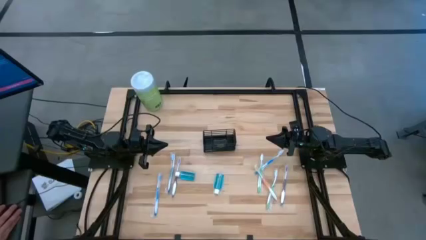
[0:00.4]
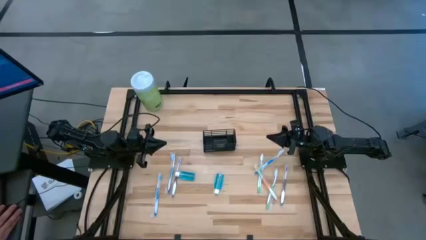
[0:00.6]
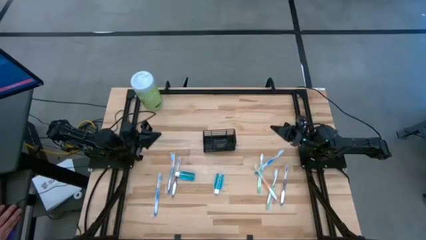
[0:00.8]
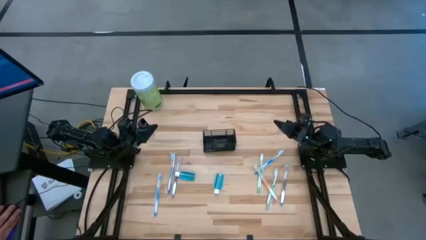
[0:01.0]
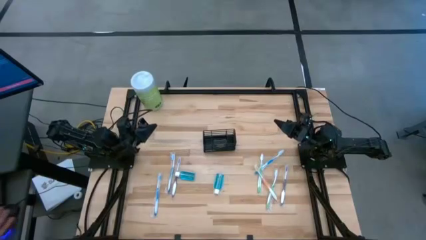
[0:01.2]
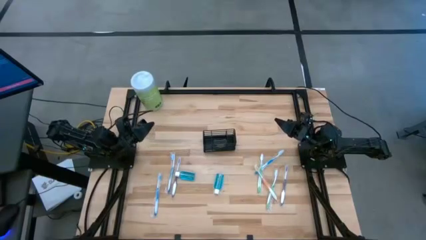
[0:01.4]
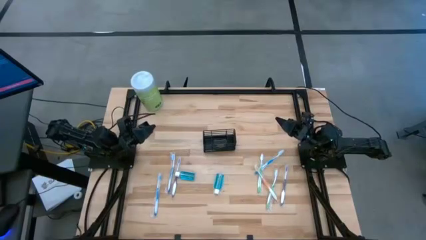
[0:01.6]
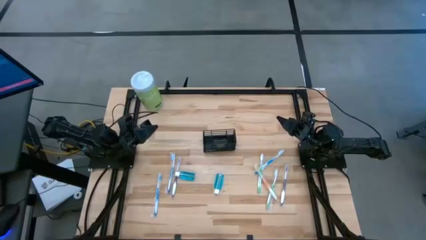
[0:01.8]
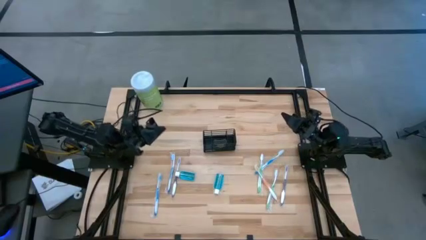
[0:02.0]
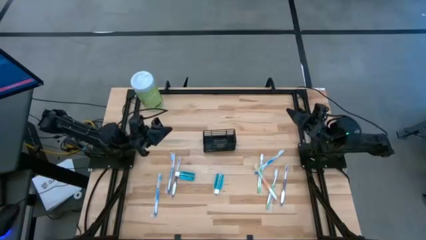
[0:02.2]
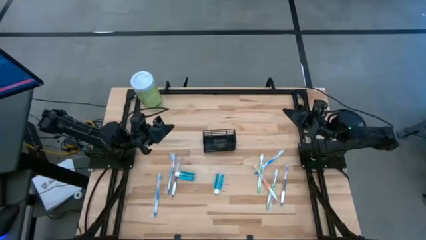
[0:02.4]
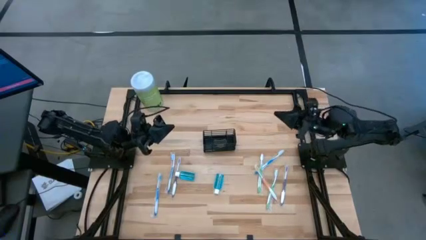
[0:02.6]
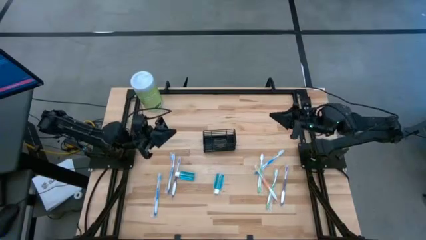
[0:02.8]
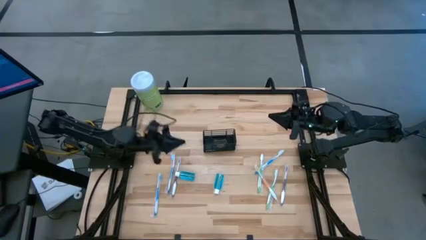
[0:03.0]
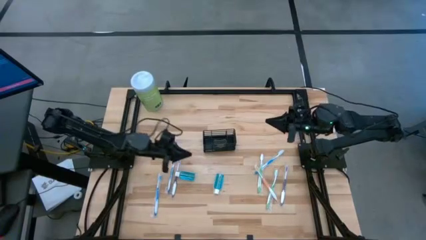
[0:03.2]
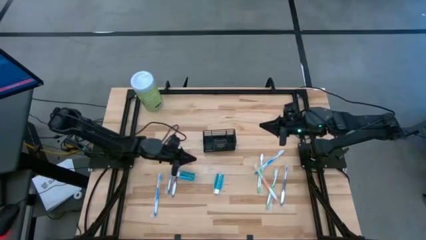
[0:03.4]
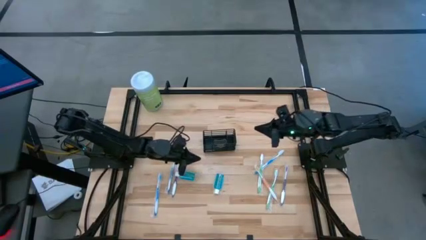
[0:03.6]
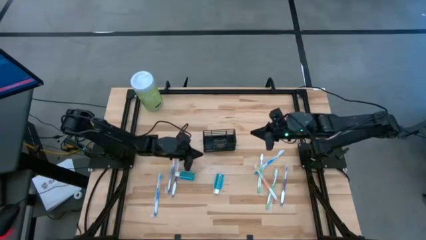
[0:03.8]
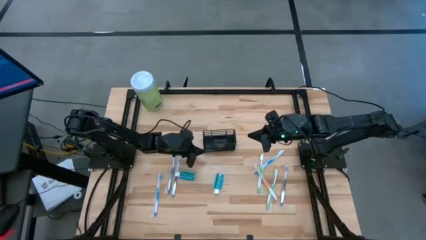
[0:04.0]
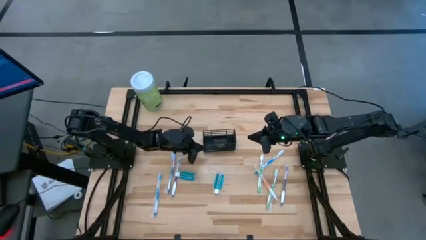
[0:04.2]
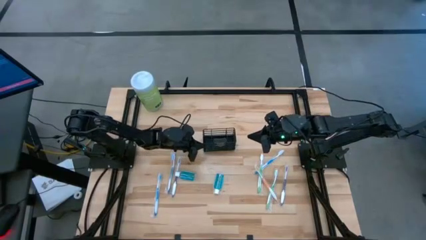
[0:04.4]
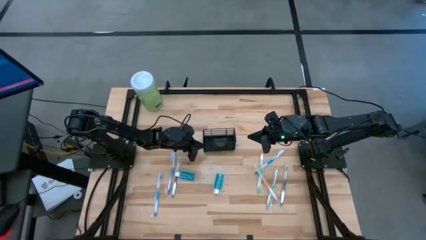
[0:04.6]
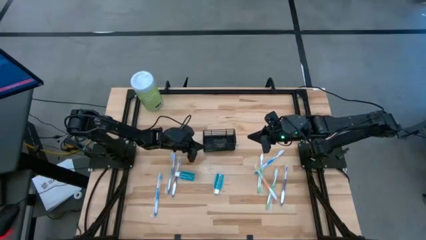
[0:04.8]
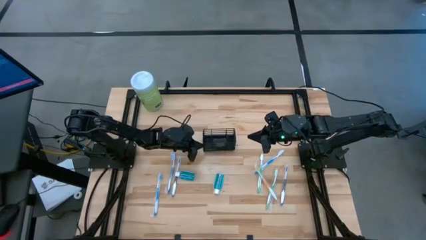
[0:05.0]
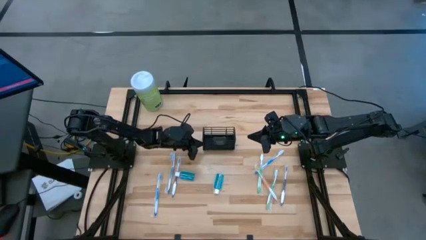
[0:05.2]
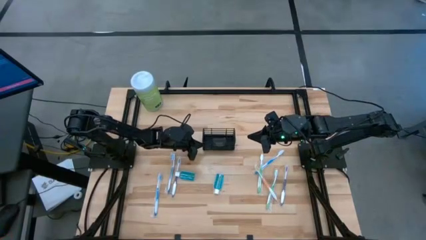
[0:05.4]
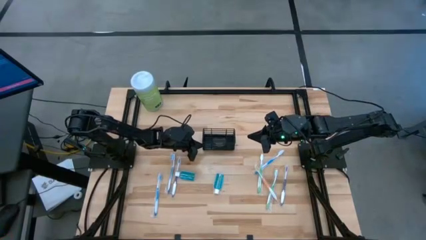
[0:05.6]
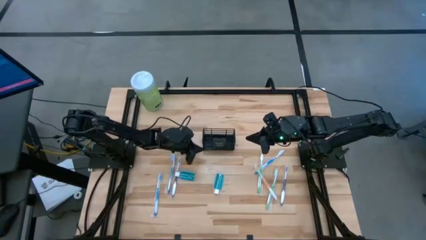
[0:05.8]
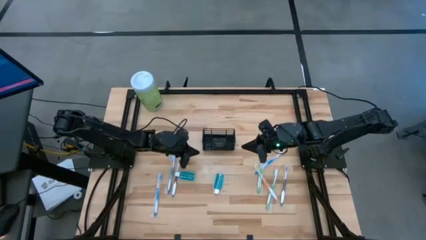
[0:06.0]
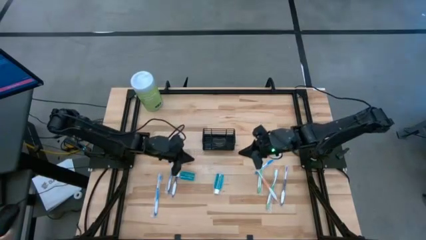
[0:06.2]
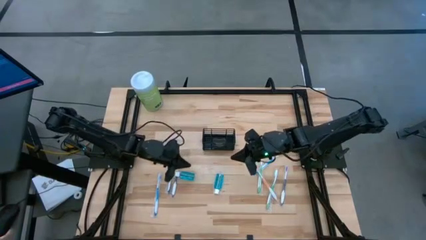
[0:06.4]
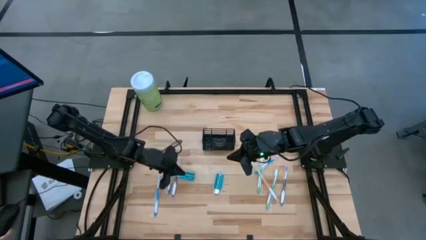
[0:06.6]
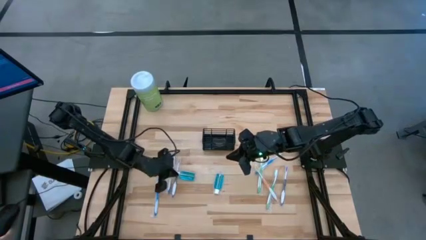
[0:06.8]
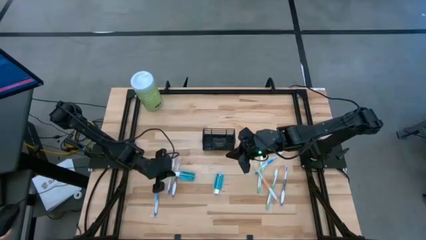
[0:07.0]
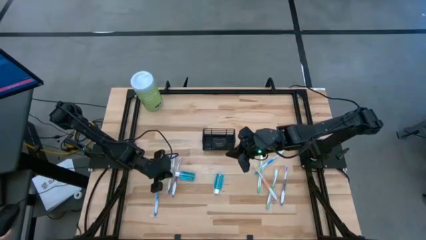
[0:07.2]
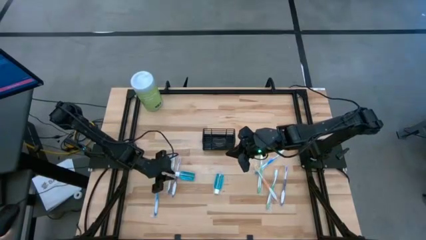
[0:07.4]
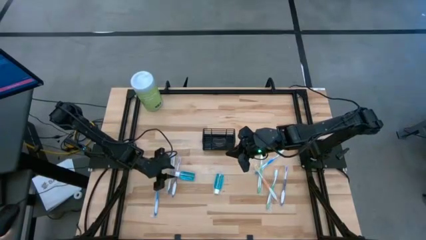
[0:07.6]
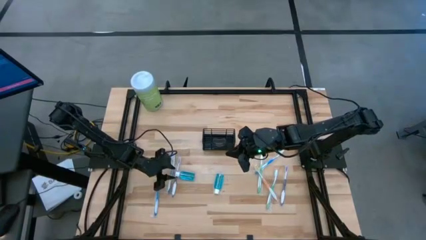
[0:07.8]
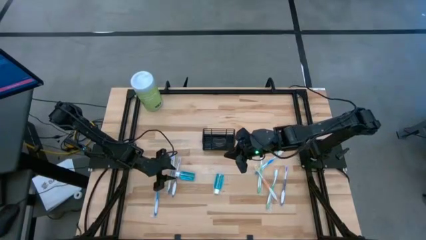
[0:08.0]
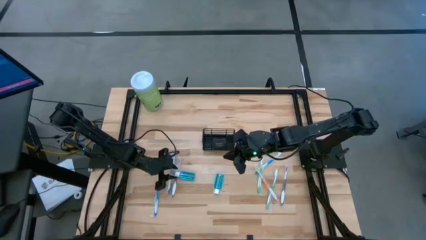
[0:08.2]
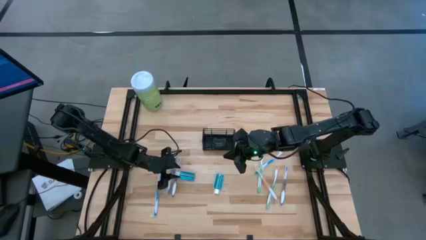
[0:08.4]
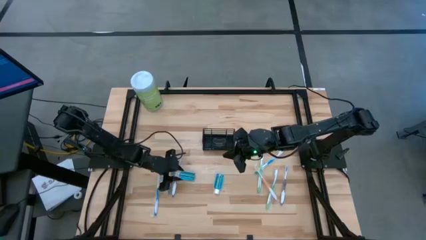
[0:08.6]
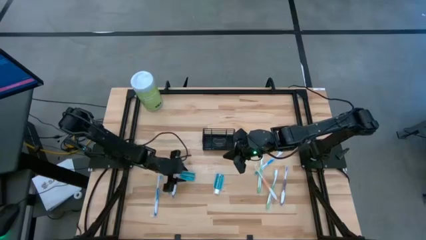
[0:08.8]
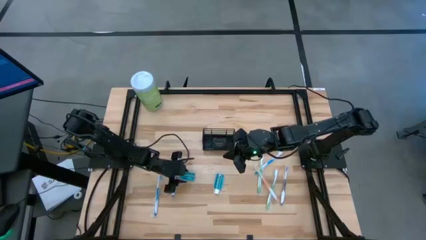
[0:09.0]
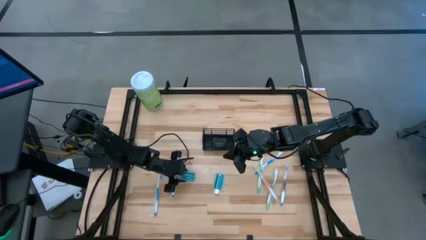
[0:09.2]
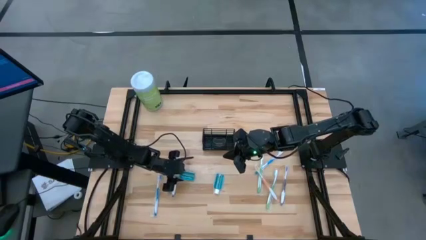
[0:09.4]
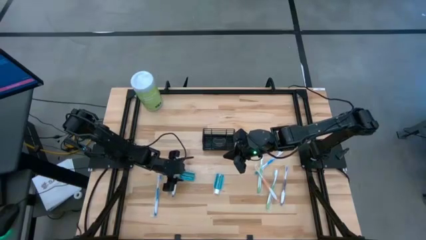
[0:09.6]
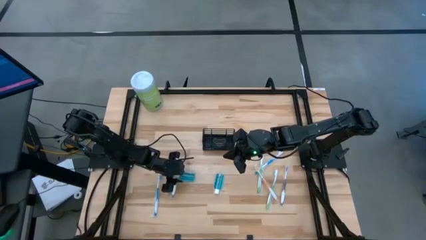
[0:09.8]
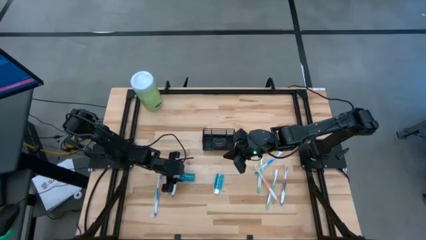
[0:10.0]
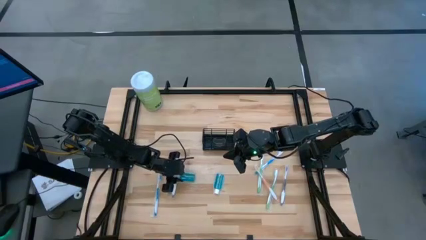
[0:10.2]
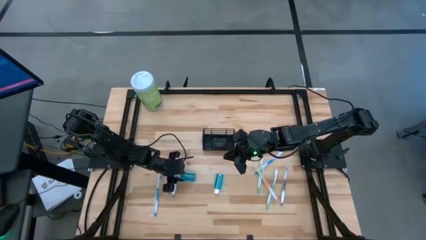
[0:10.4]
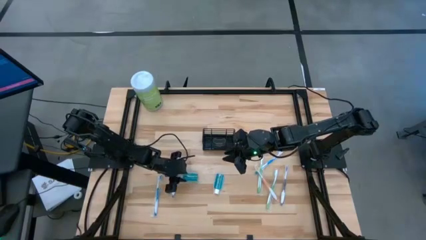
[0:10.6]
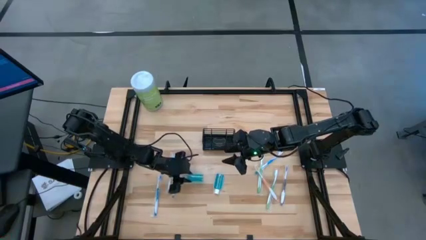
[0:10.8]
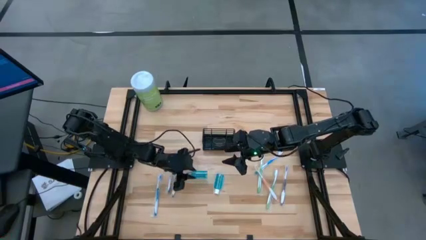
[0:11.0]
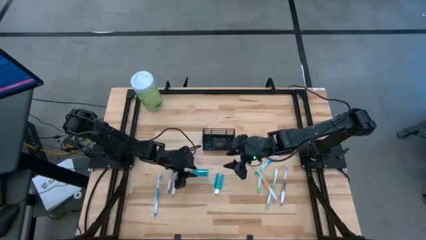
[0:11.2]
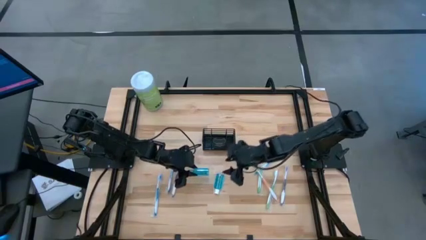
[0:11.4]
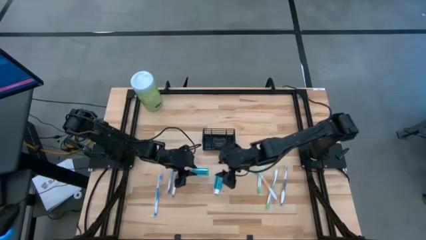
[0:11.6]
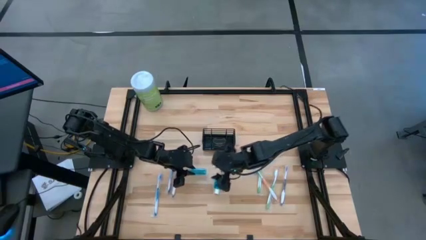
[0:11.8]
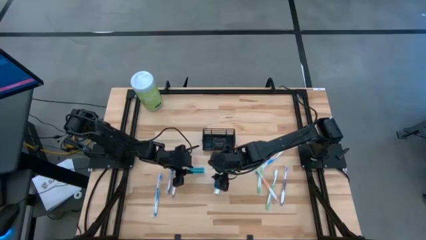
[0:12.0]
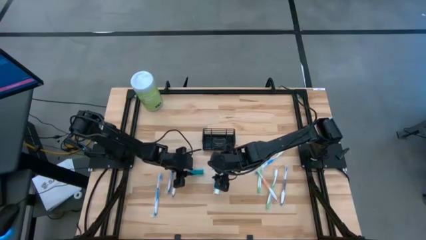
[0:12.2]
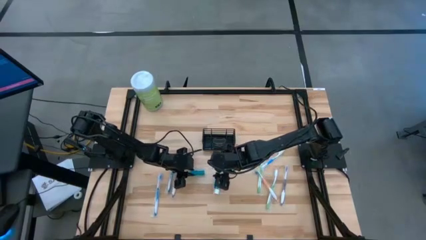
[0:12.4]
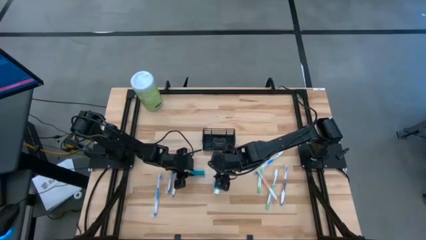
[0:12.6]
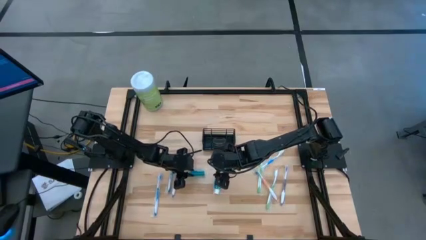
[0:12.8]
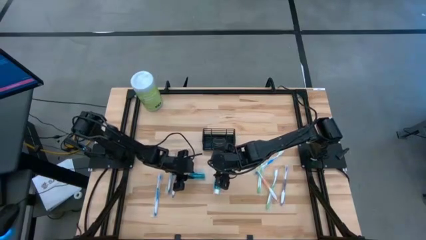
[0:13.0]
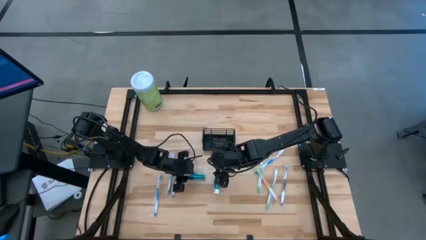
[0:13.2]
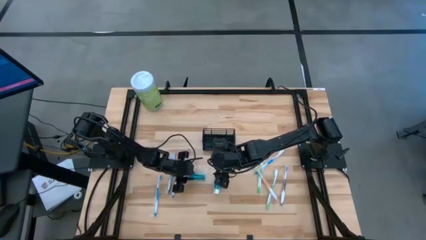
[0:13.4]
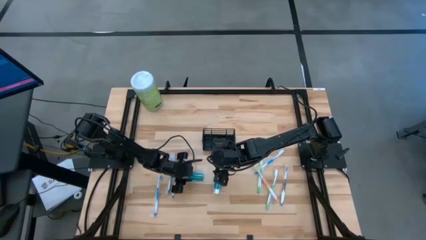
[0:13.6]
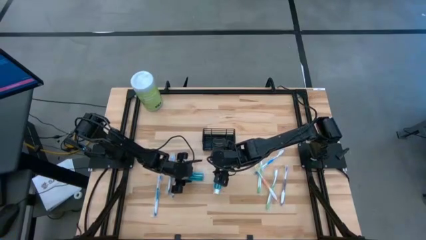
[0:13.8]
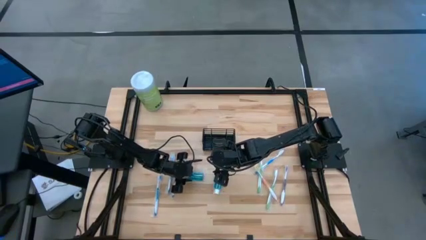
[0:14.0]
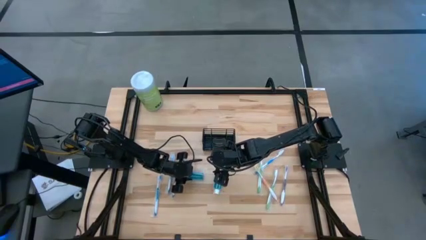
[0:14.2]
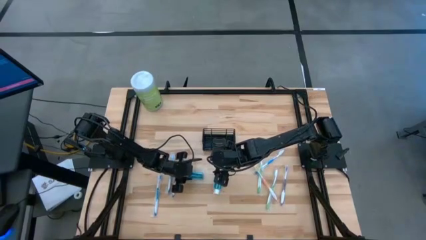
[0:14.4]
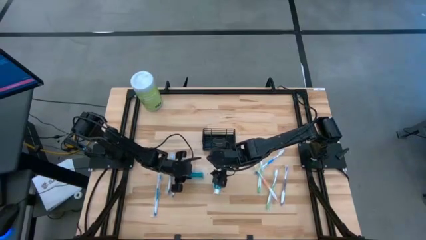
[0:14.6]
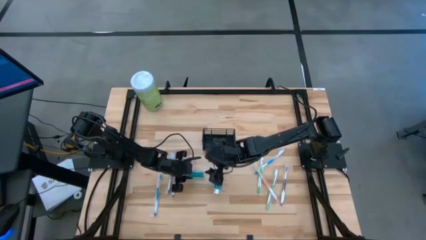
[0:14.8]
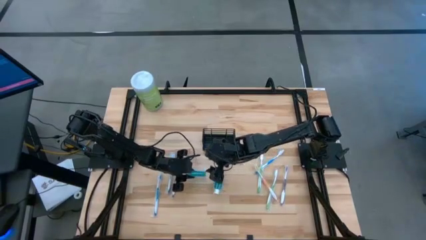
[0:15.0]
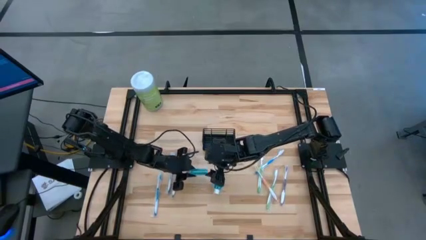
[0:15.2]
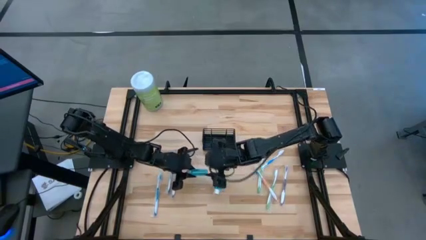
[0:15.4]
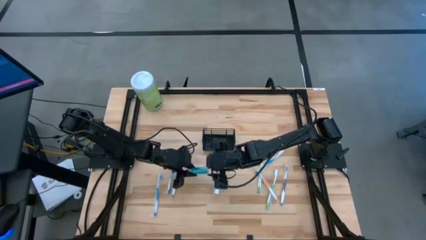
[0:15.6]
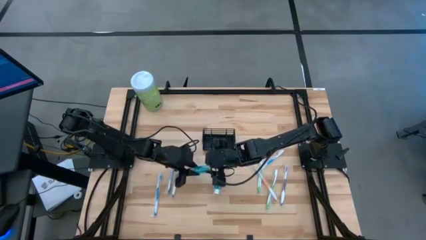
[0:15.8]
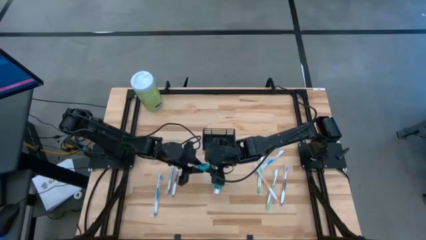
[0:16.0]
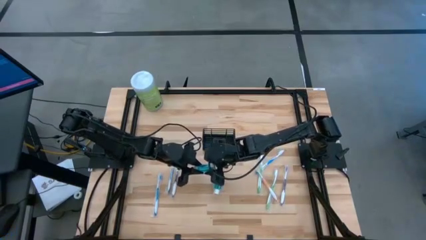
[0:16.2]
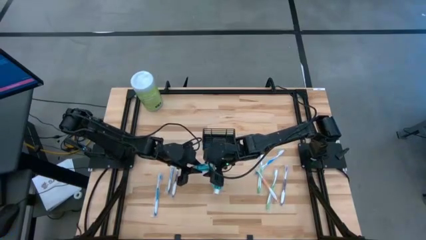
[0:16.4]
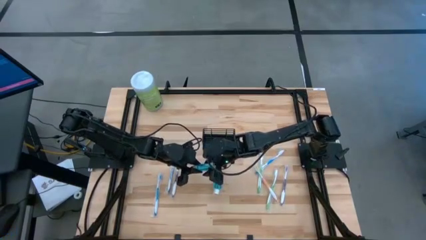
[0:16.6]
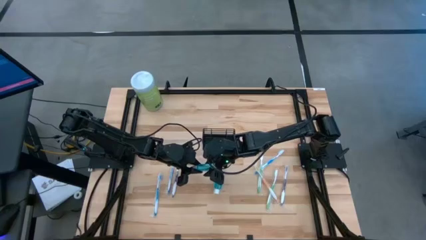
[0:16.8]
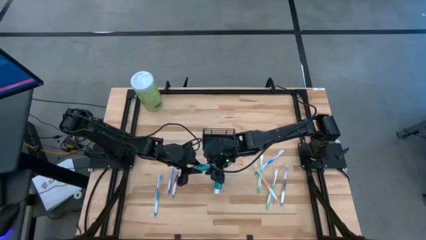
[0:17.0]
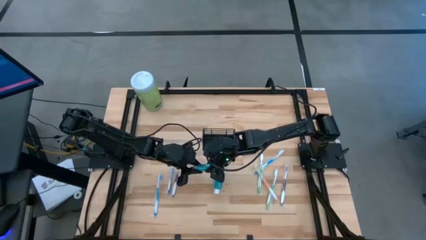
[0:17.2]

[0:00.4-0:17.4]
Task: Pick & Place toothbrushing station
Put the left blue mouthwash into the black mesh organizer
